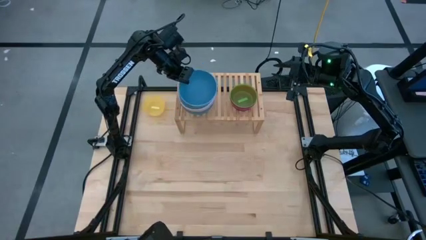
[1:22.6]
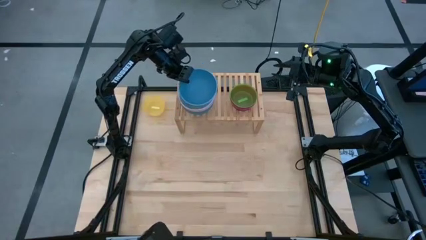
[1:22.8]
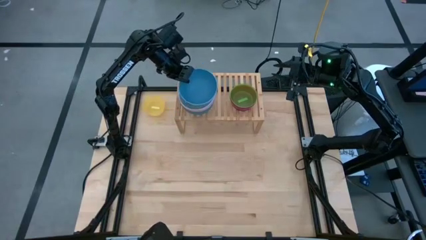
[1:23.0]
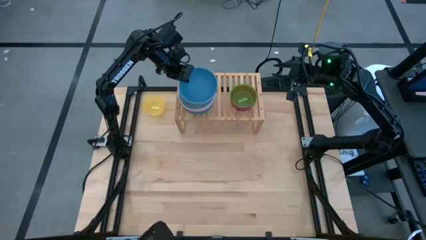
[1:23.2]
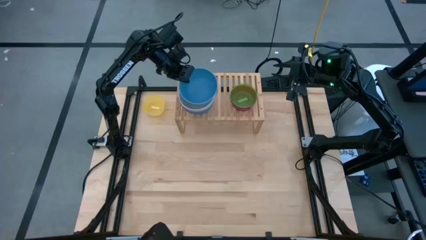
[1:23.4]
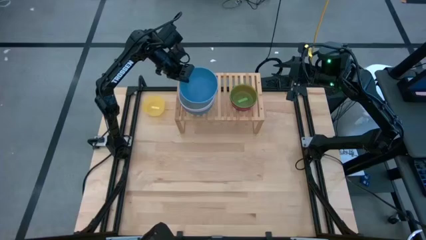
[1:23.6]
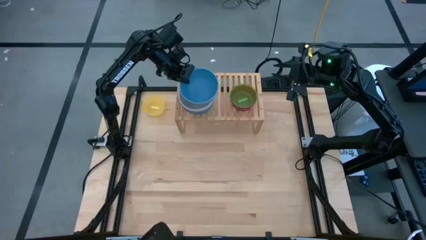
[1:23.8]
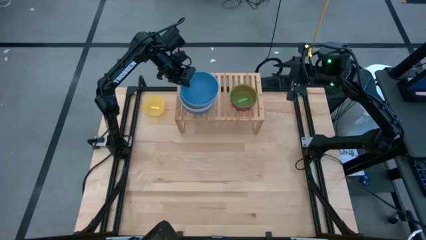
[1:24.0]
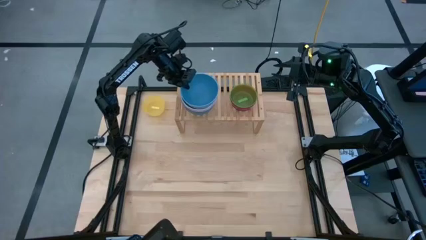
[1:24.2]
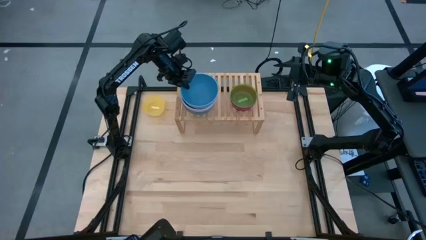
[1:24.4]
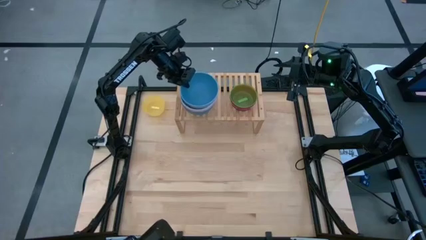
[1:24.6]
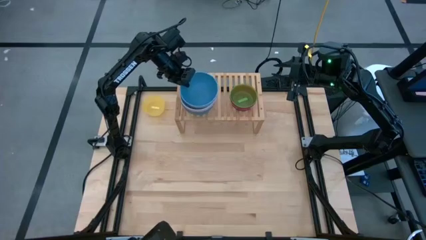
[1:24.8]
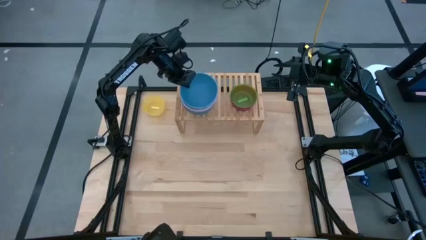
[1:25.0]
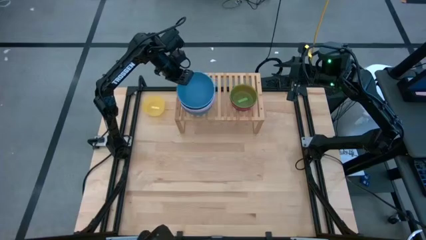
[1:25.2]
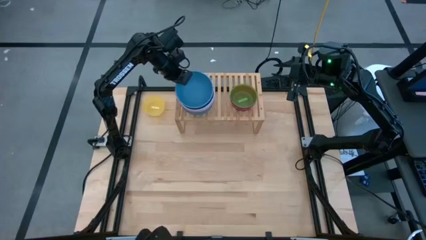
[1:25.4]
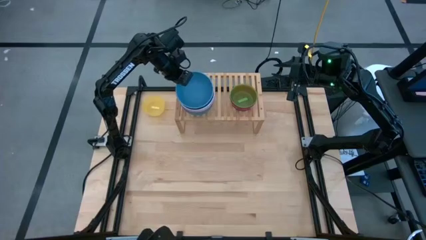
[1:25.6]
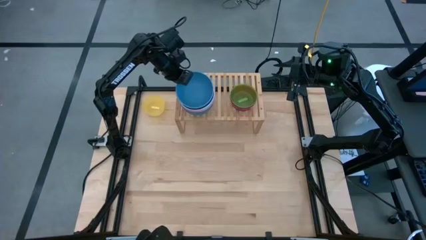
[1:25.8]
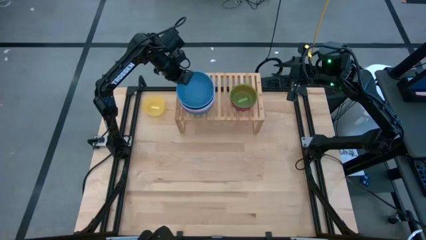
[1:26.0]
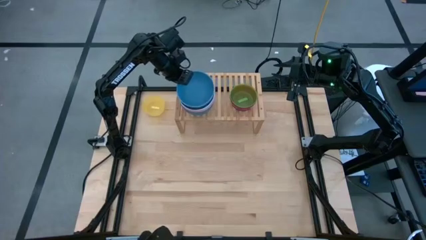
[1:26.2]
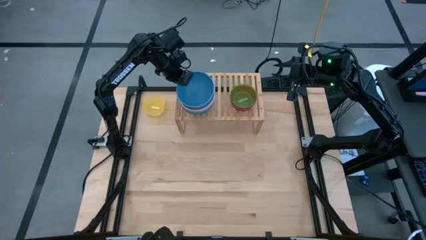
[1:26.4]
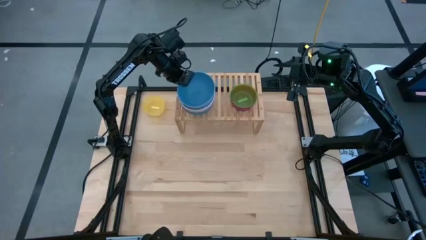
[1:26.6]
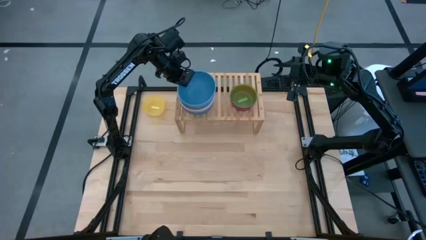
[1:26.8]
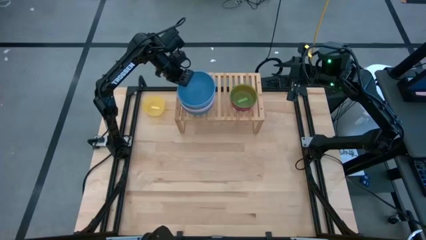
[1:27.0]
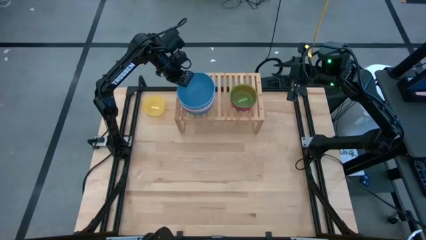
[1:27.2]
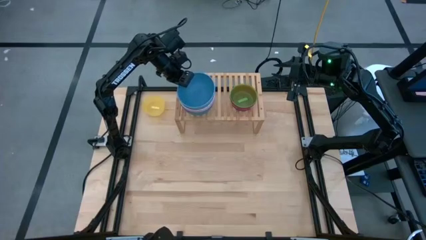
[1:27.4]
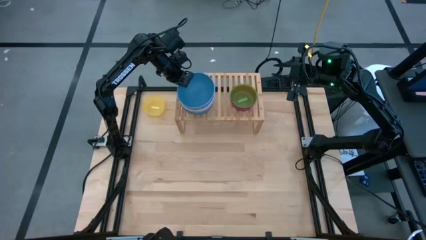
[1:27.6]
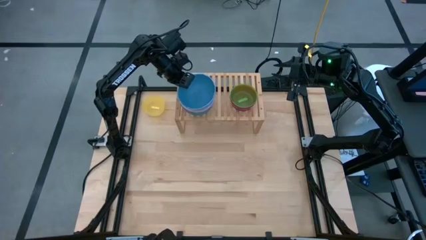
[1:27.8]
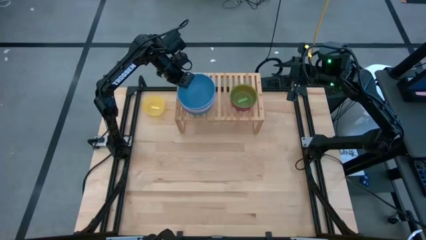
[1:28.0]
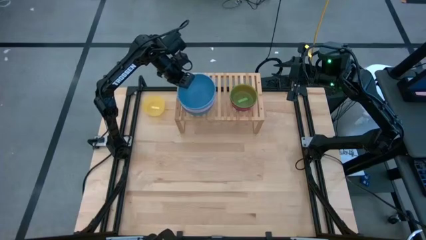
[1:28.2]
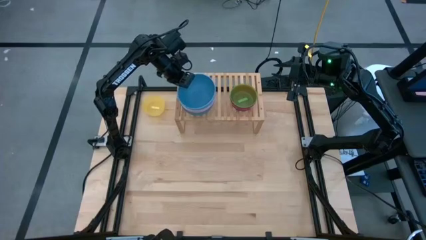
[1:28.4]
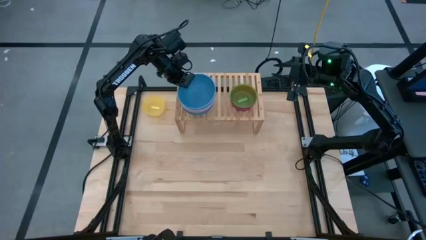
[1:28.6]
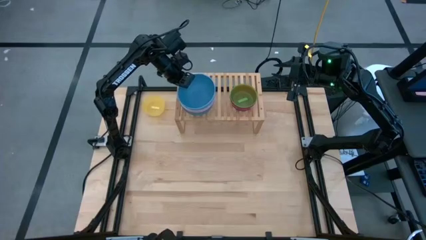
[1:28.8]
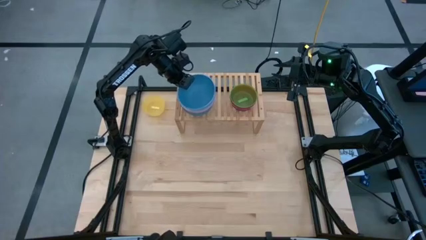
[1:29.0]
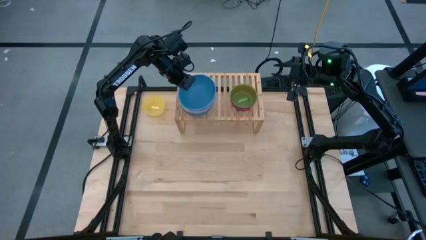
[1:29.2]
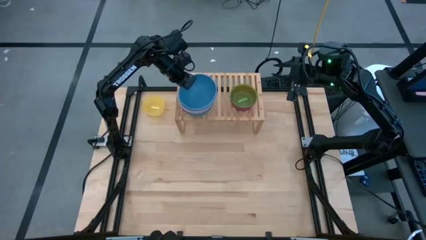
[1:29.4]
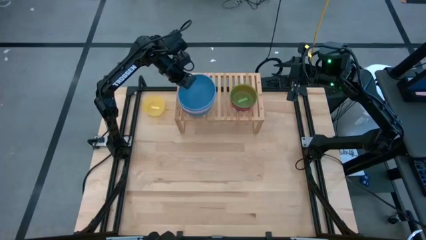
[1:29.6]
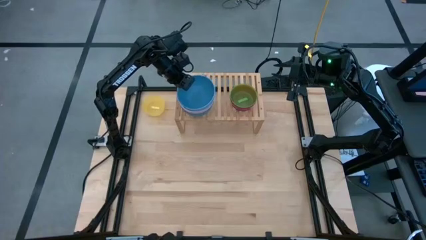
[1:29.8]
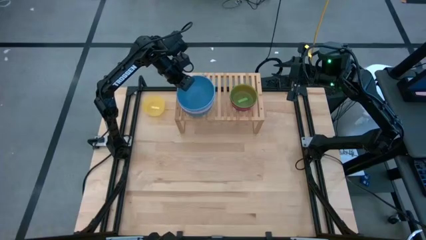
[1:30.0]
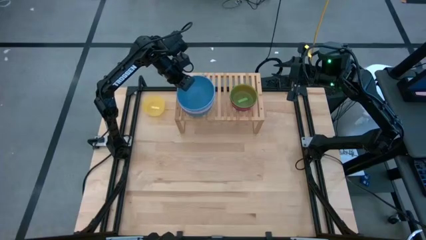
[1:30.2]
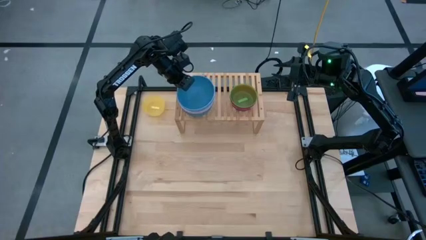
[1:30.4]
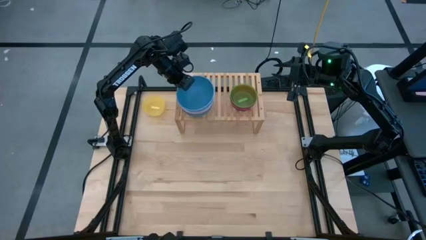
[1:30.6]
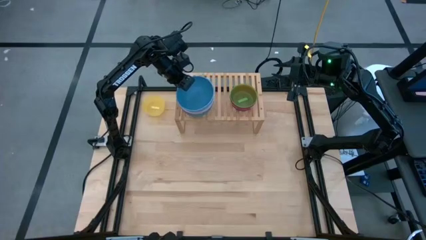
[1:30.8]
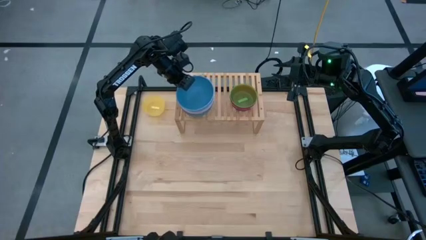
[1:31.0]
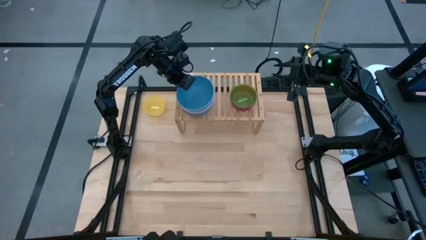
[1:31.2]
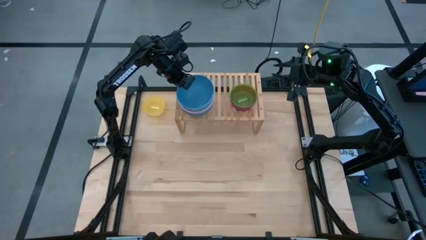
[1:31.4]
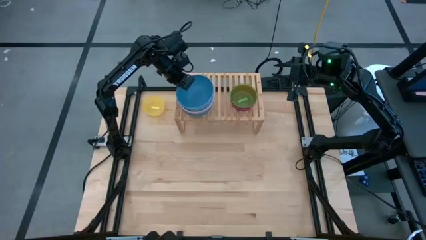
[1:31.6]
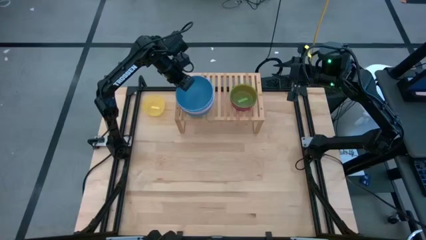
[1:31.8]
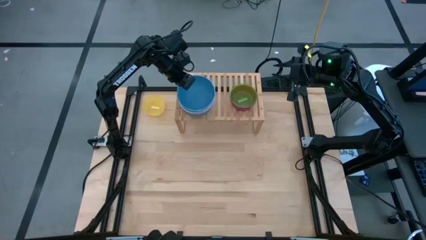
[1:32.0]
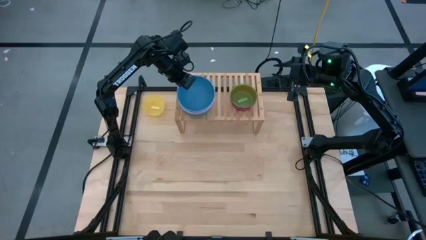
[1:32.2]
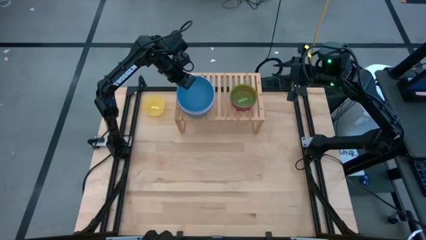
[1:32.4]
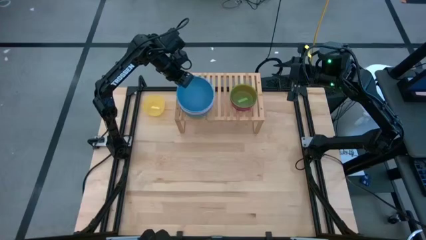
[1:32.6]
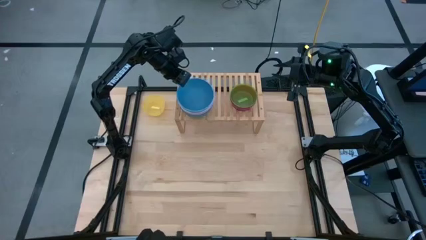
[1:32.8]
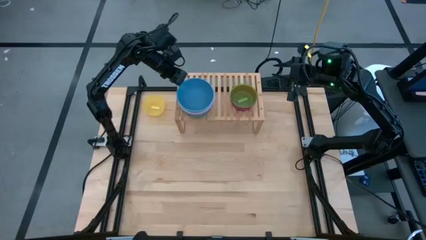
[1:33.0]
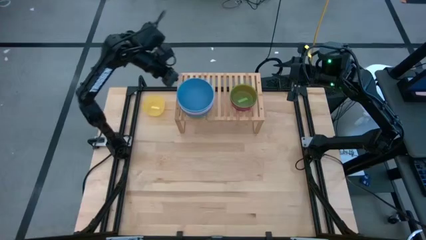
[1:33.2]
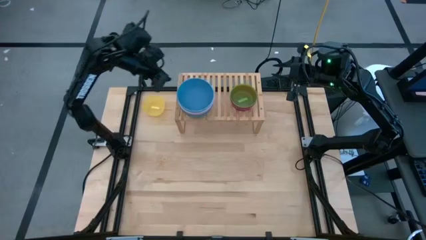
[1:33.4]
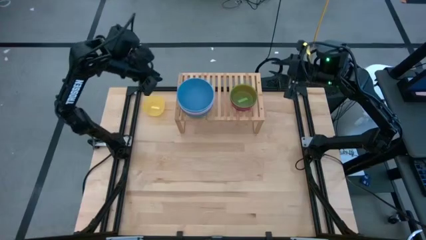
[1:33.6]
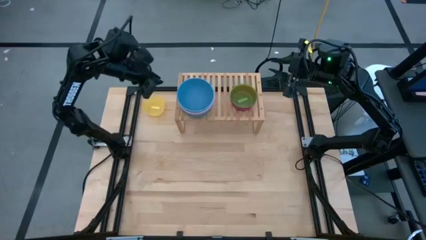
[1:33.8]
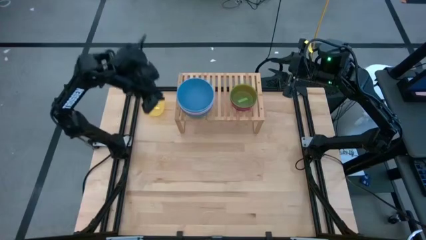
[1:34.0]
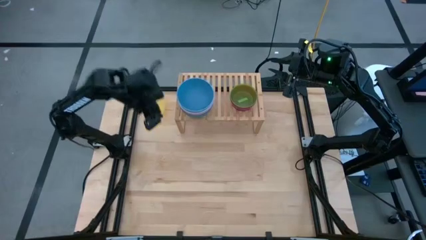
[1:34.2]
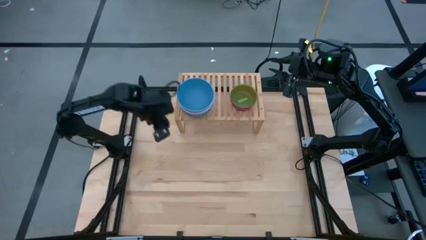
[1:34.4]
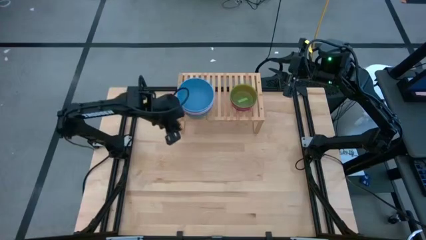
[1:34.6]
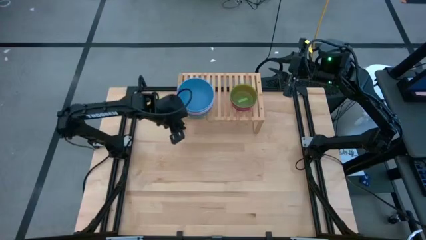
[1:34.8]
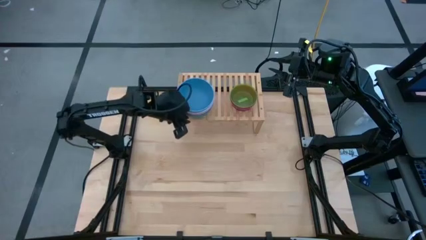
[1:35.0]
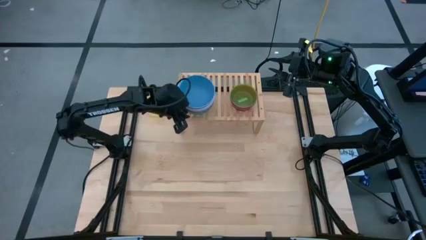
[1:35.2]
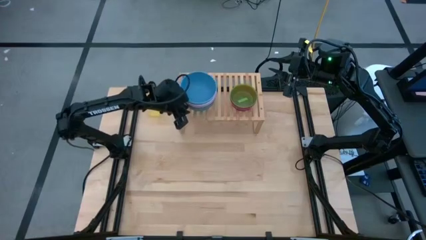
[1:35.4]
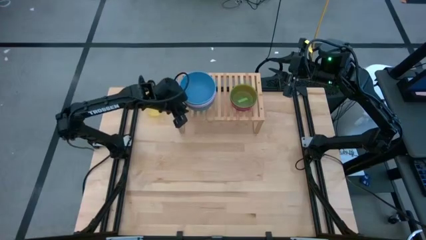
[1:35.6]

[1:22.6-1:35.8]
Task: Place and stack bowls onto a shelf
Stack the blue bowl on top of the white bowl on the shelf

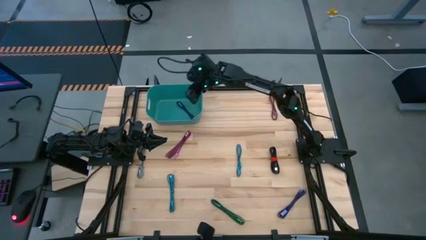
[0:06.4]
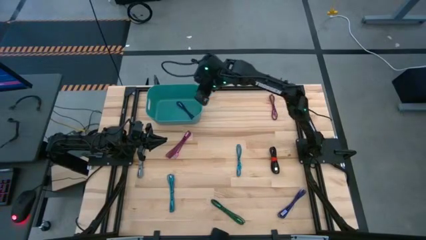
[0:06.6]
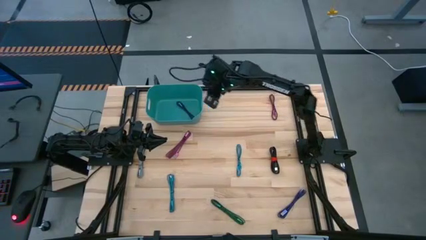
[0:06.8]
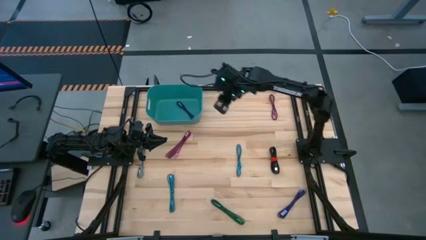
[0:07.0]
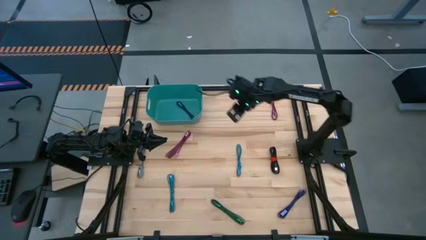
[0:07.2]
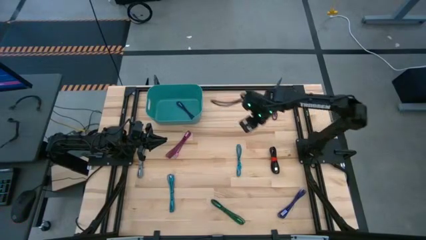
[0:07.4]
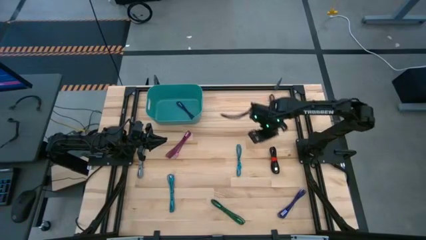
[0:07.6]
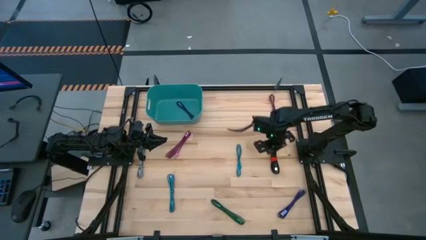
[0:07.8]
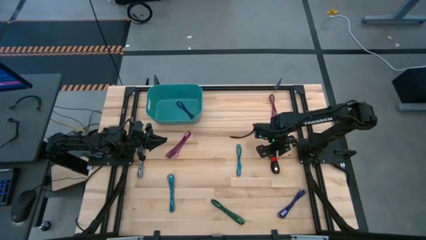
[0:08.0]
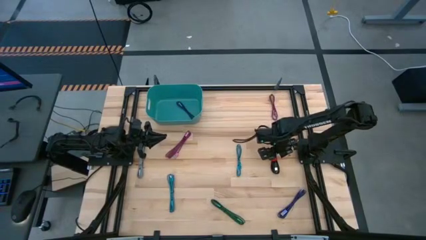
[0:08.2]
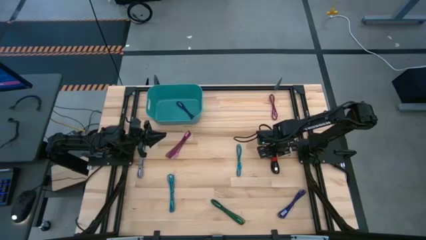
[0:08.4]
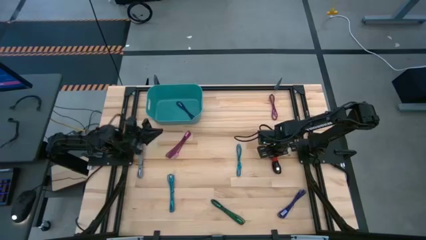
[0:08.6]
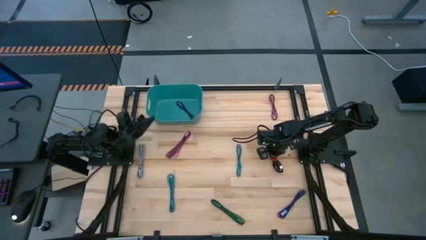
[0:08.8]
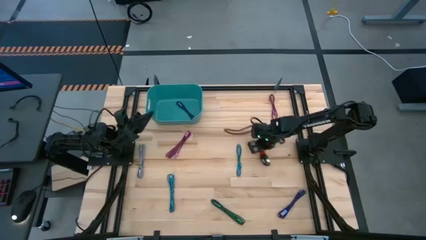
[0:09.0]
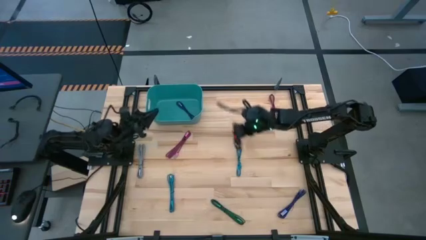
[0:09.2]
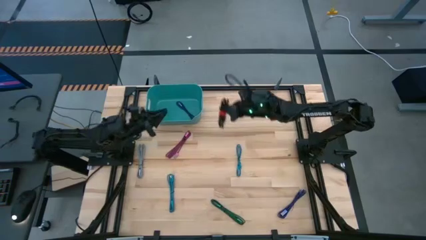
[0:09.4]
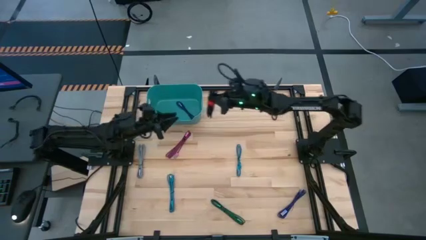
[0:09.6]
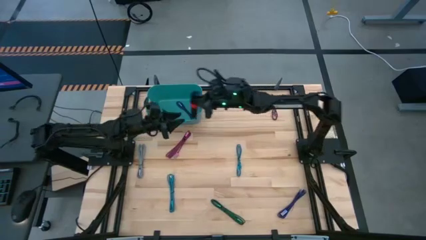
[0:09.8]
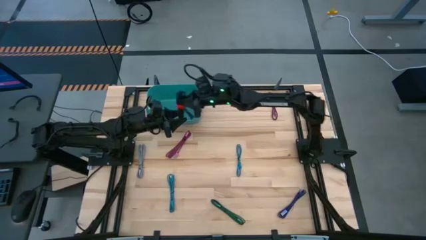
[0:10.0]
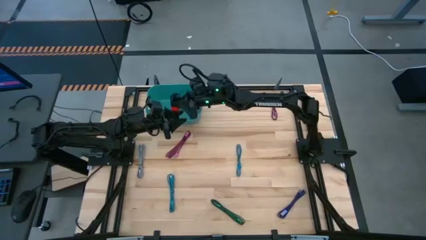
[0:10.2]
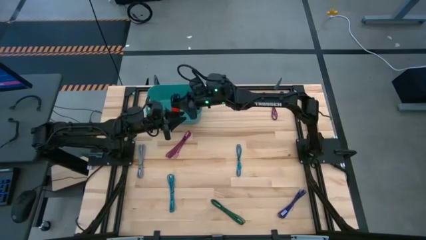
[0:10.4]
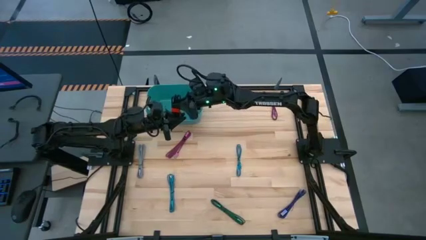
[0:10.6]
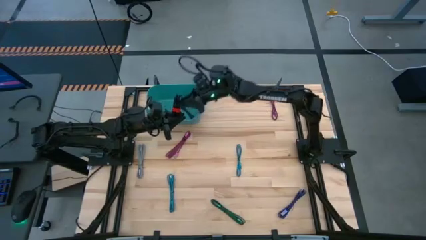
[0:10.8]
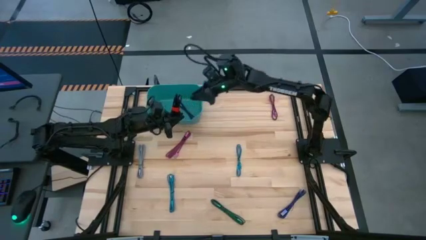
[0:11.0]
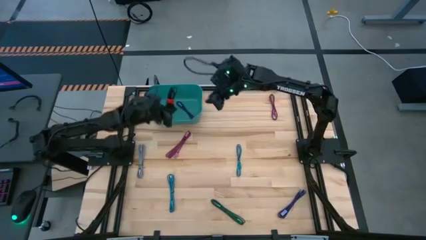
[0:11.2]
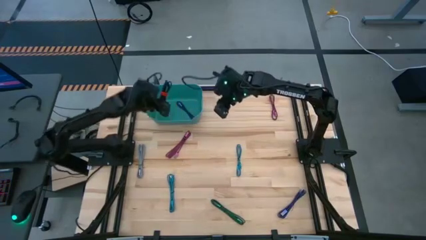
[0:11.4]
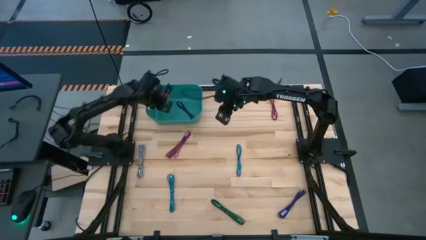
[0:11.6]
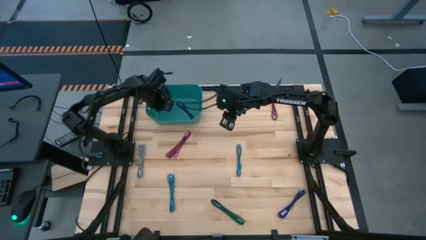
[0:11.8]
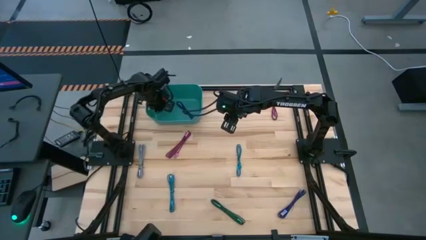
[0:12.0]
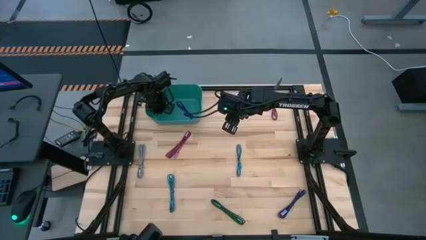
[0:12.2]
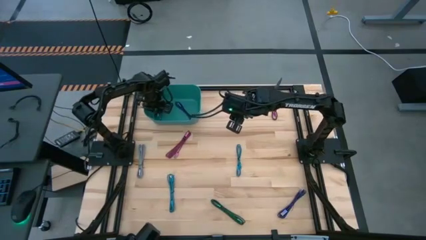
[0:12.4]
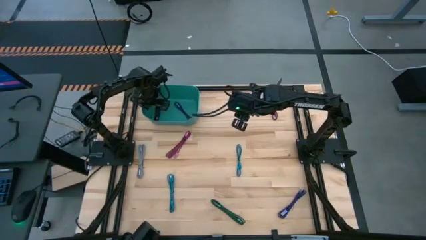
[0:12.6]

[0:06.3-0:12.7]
Task: Pick and place USB-C Cables
Put the black USB charger cable into the green bin
